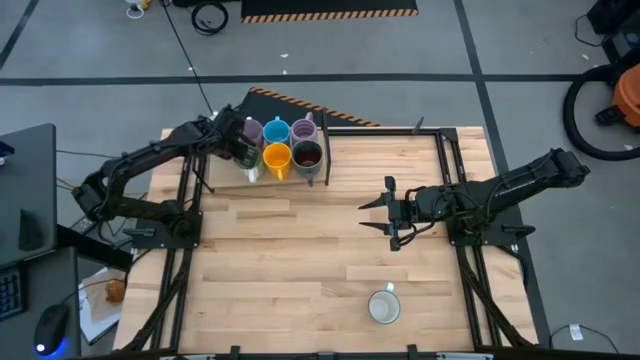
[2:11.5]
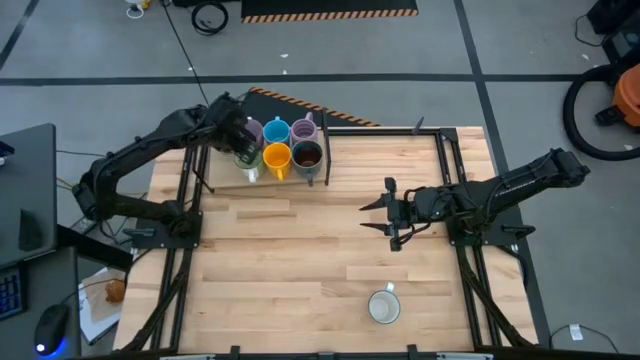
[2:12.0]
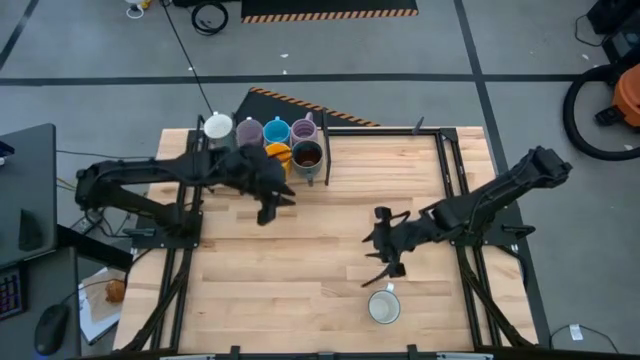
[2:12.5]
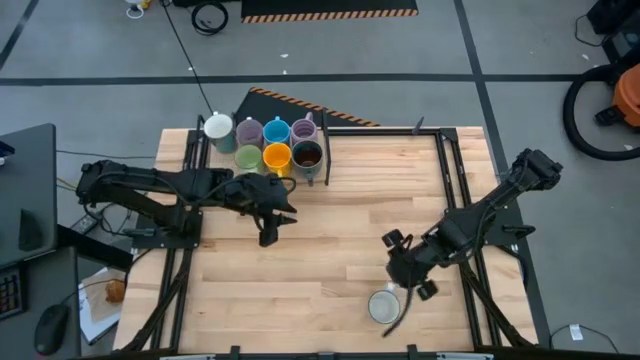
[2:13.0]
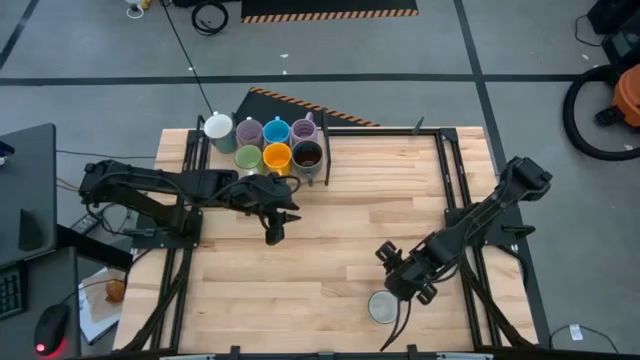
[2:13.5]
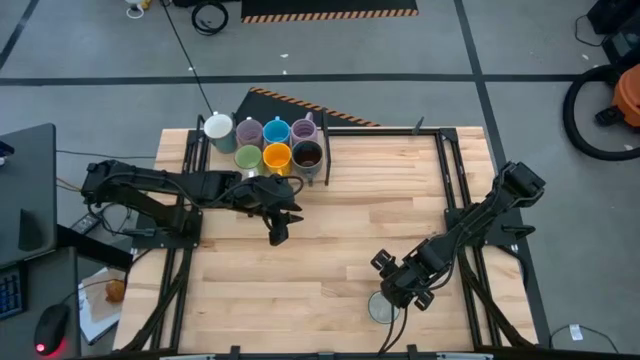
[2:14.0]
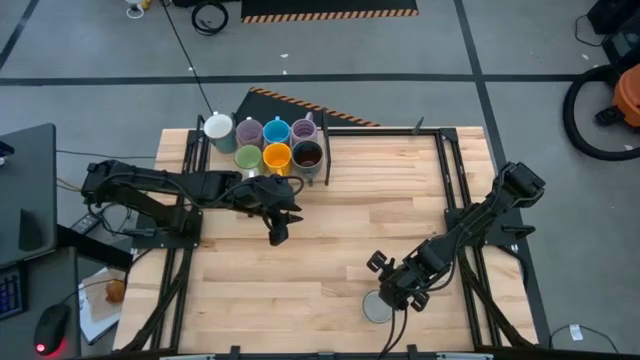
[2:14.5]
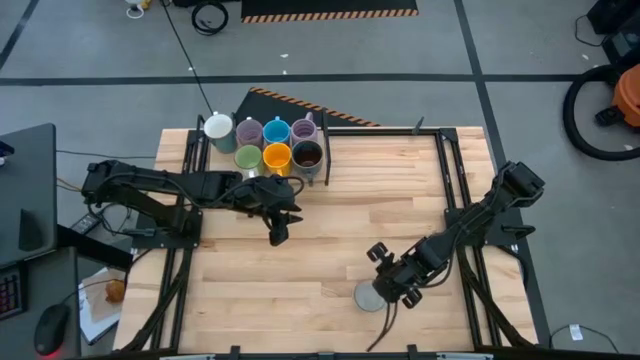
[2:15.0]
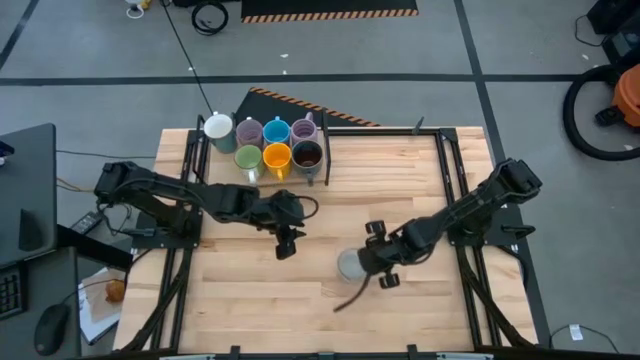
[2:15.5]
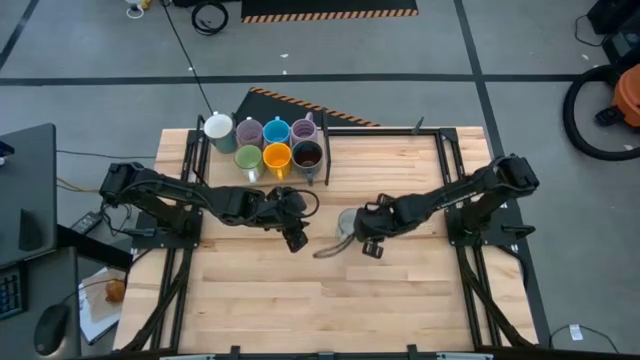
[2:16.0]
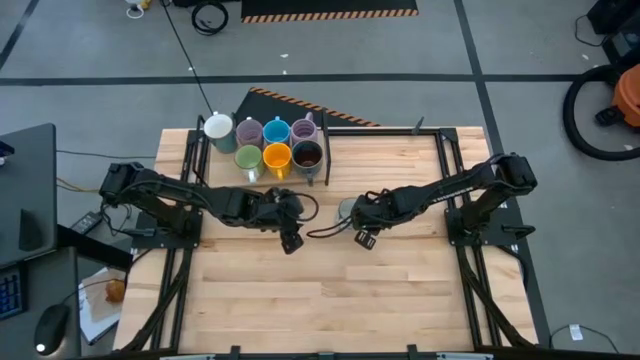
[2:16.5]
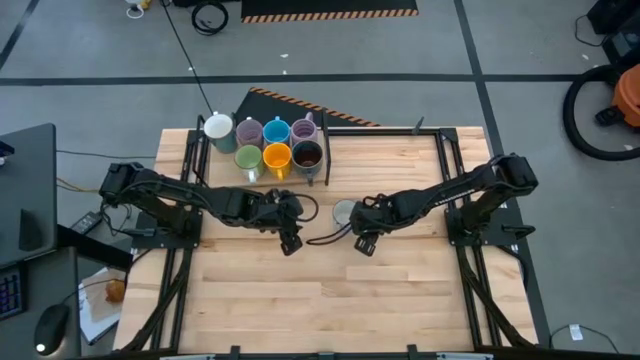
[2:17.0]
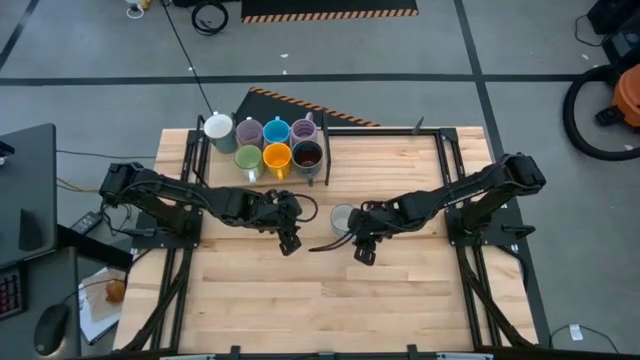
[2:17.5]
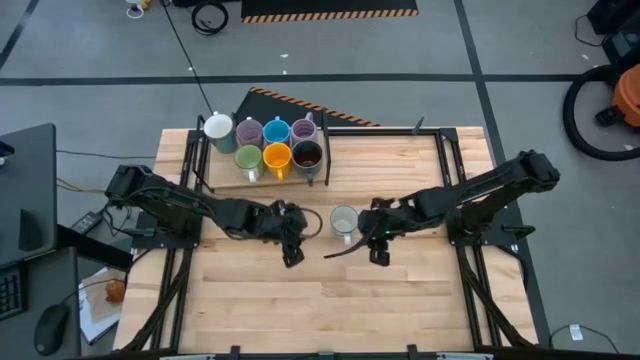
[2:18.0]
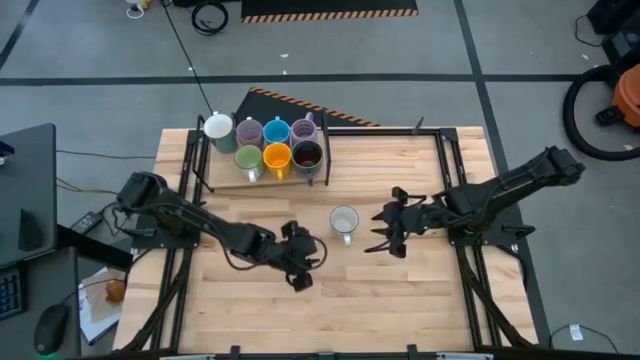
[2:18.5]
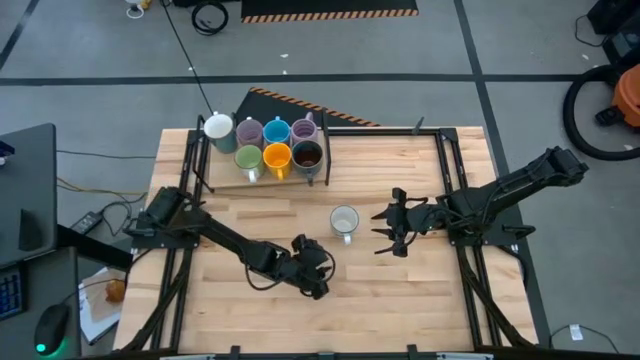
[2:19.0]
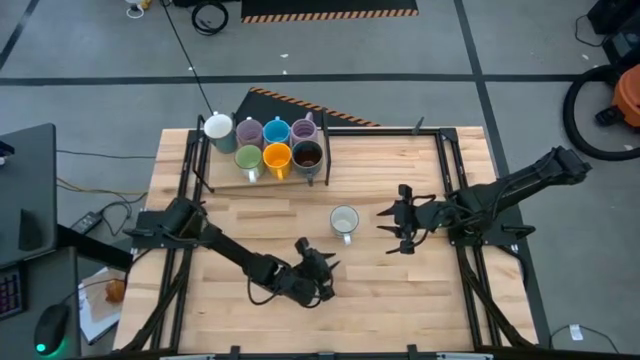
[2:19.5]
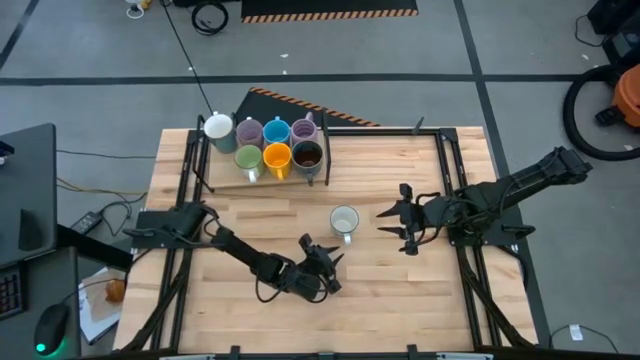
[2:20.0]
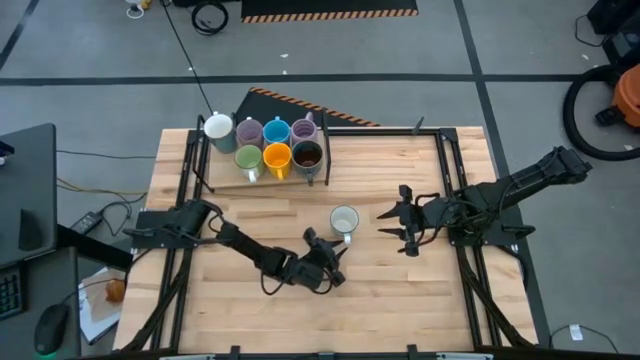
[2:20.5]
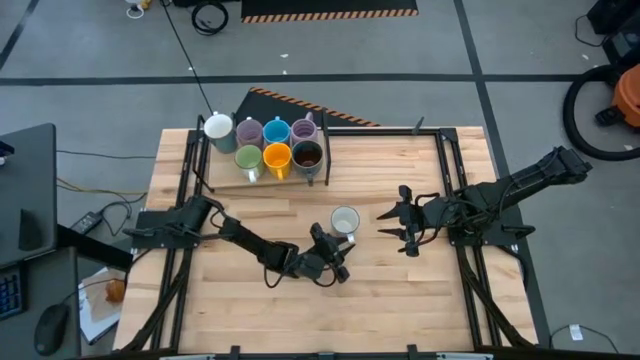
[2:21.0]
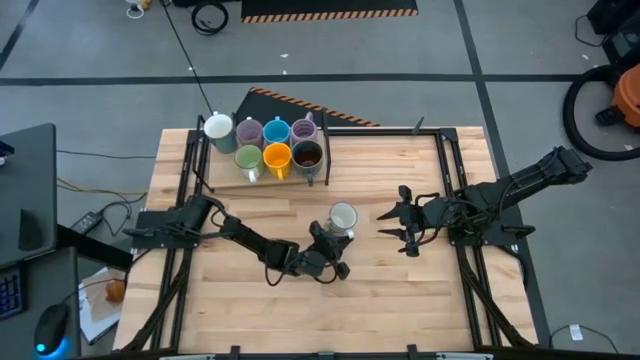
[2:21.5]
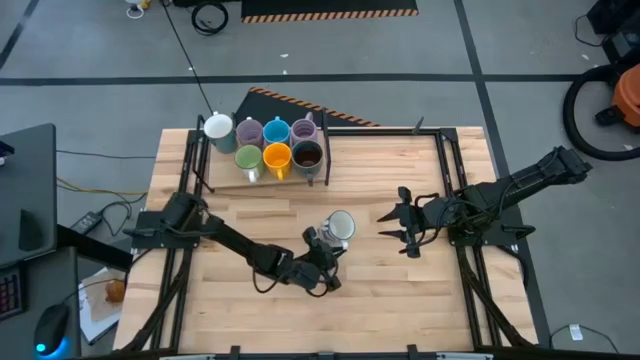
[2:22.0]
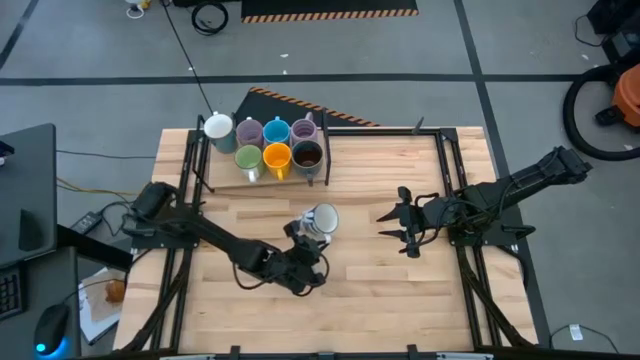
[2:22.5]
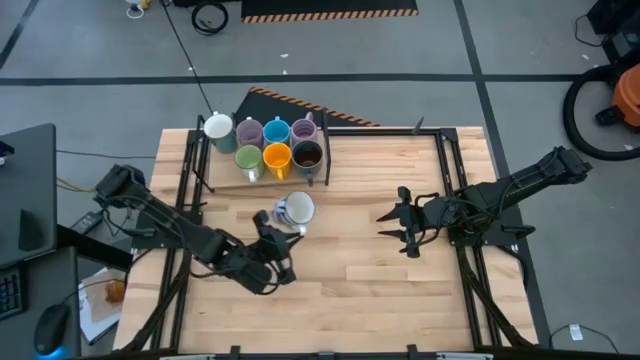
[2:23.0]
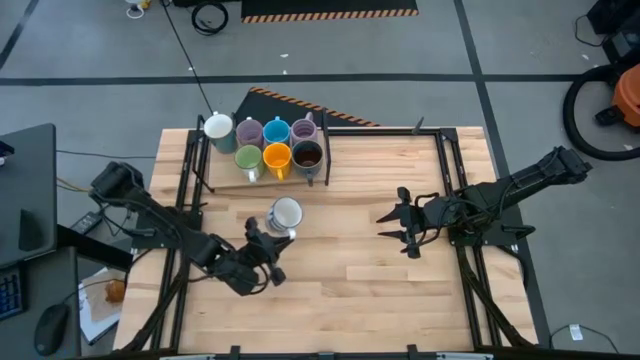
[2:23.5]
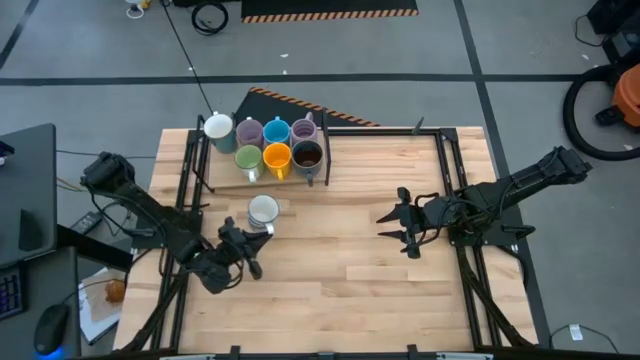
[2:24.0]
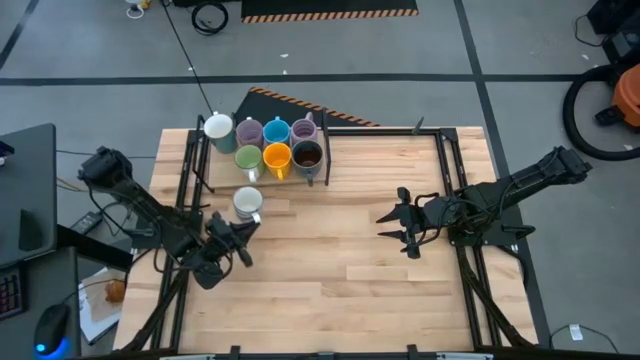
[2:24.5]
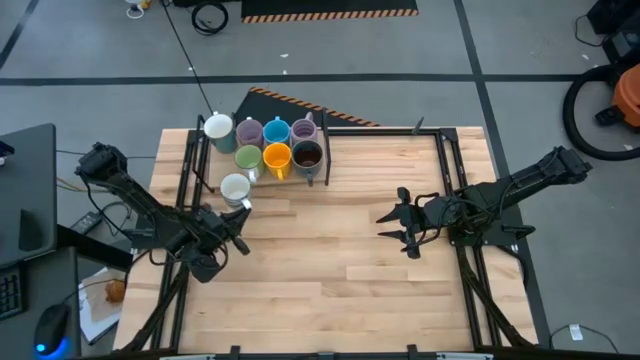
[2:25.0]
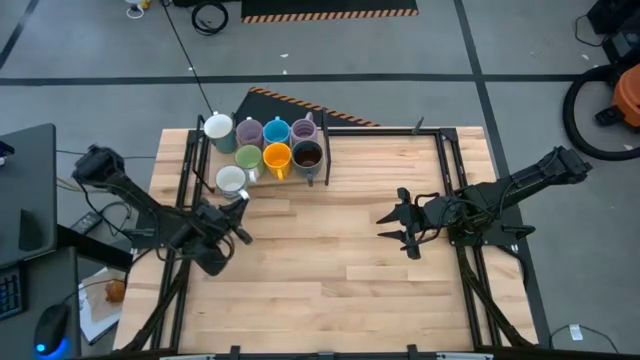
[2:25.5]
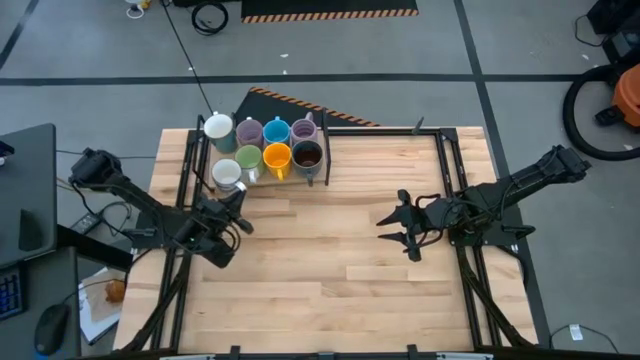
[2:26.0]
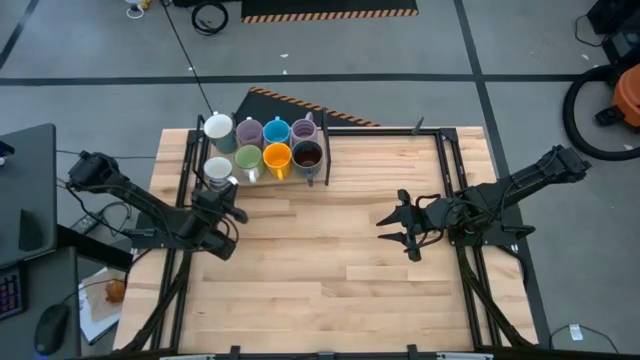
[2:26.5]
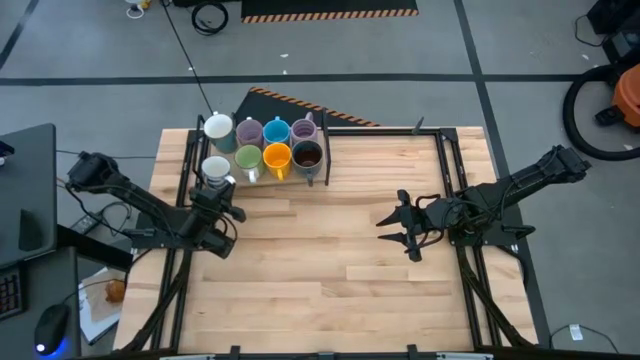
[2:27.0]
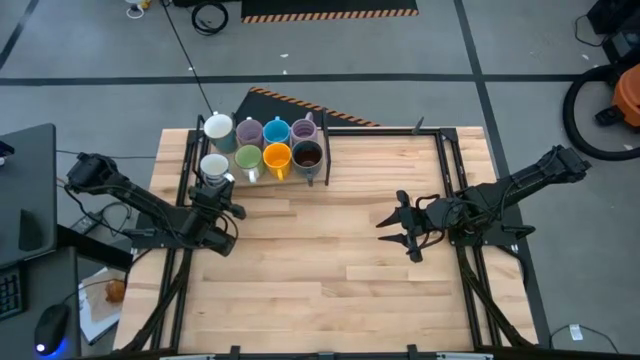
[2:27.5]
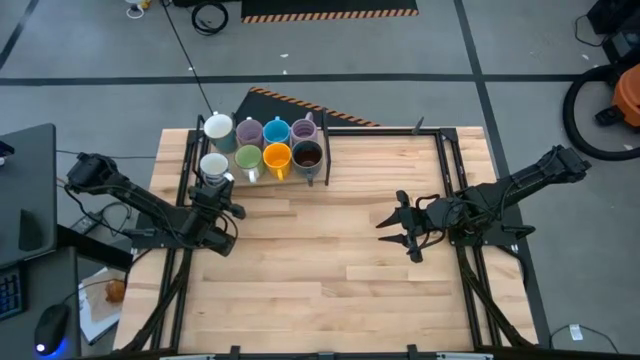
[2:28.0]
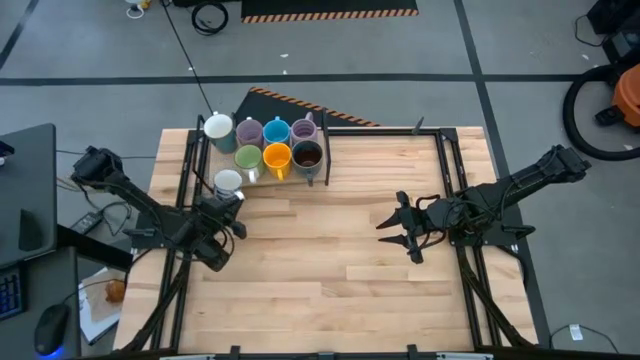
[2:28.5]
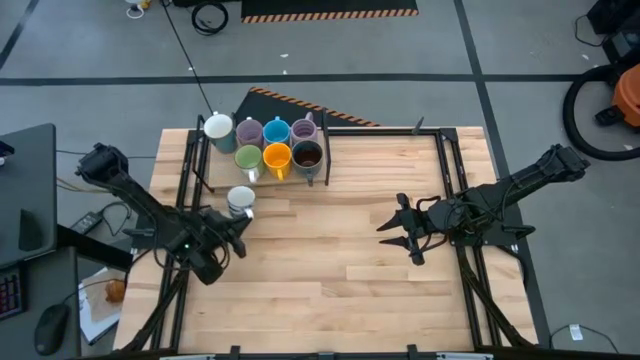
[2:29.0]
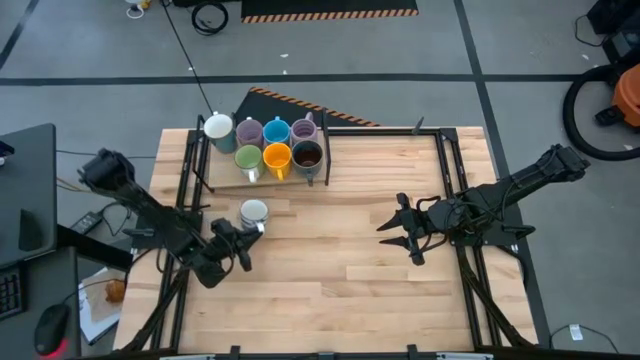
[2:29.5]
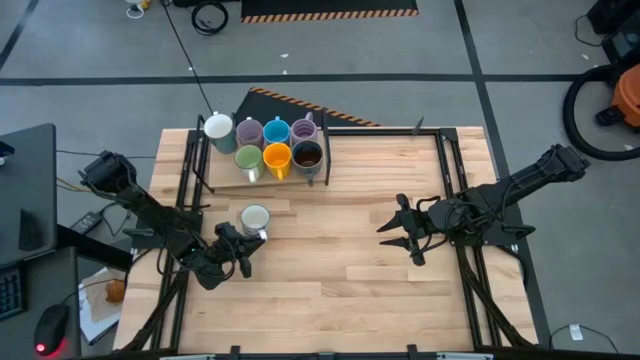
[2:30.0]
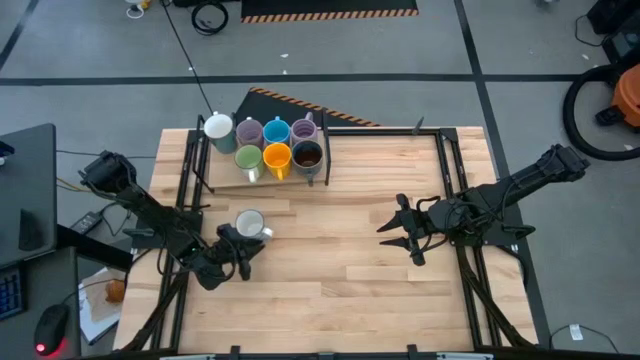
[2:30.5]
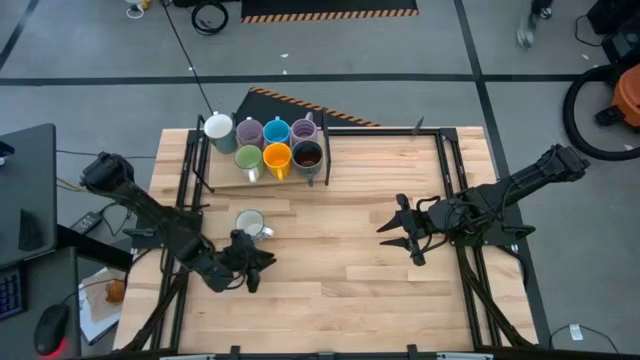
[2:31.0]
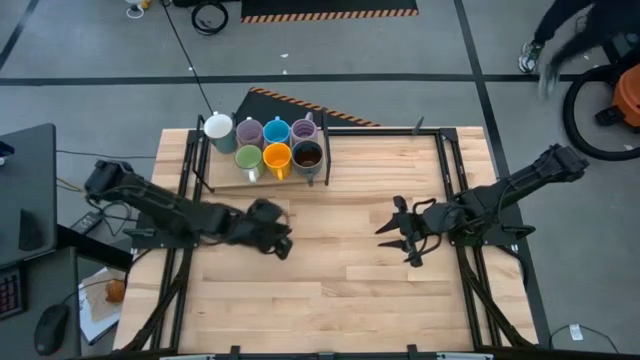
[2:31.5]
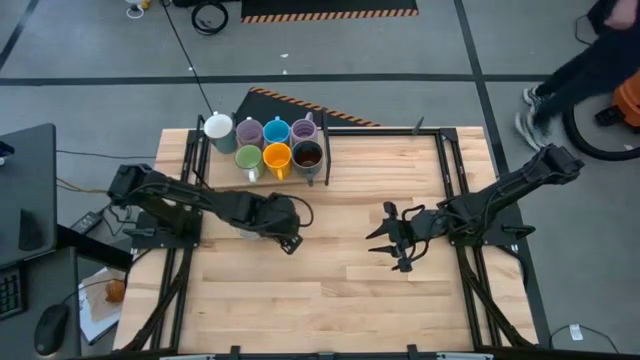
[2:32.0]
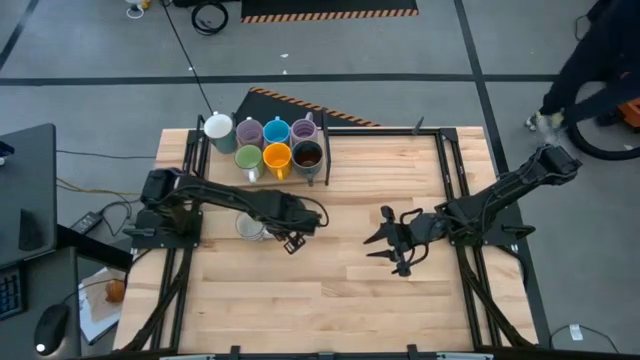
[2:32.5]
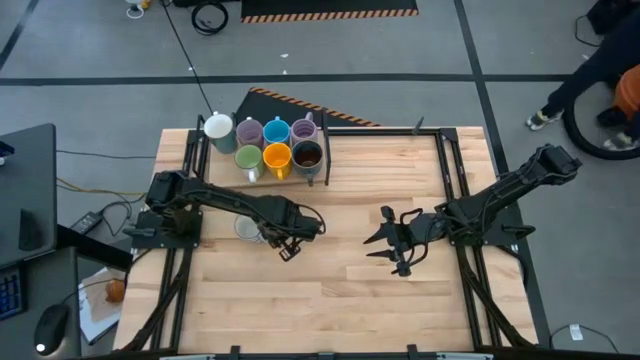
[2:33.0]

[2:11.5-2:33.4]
Task: Place coffee mugs
Put the blue patterned mug on the shelf
